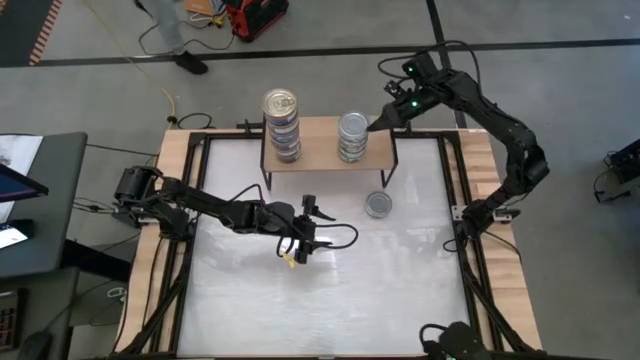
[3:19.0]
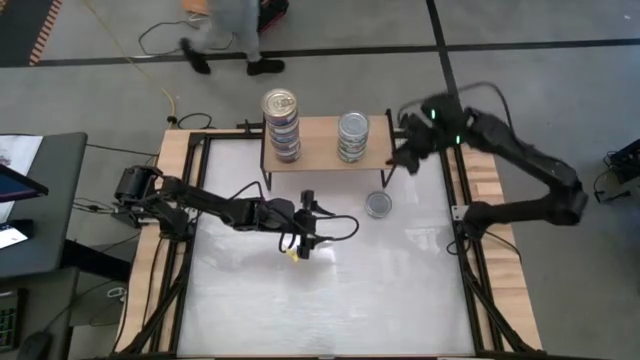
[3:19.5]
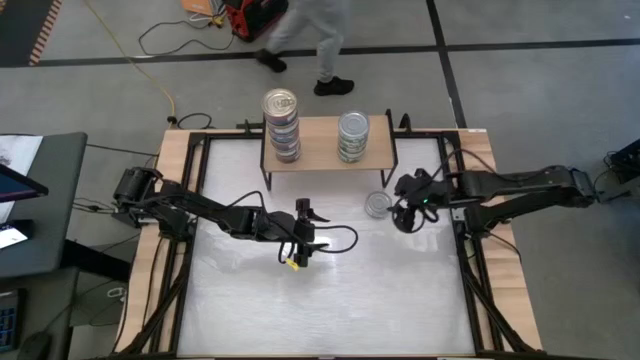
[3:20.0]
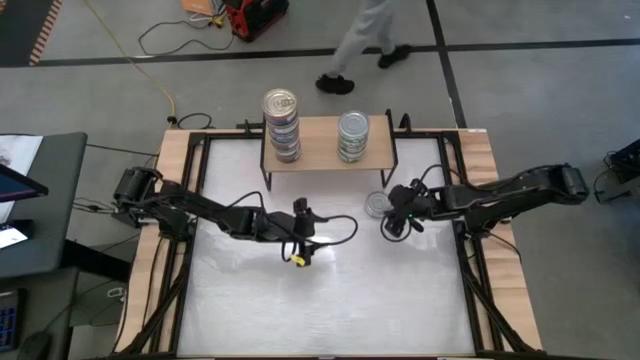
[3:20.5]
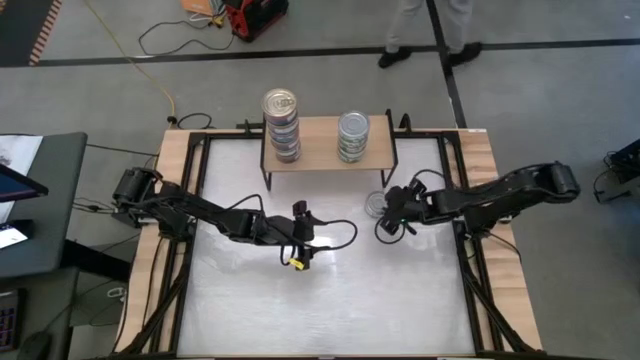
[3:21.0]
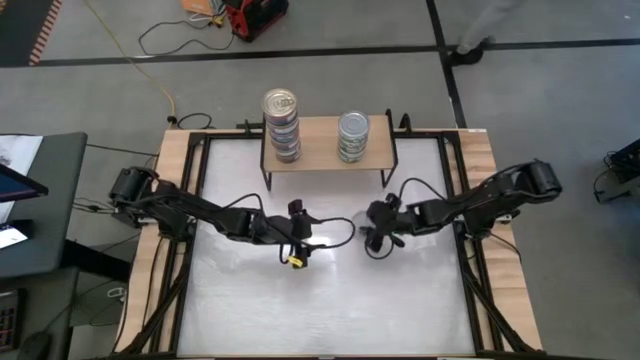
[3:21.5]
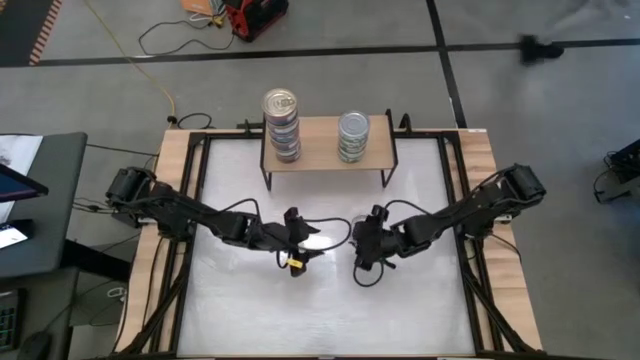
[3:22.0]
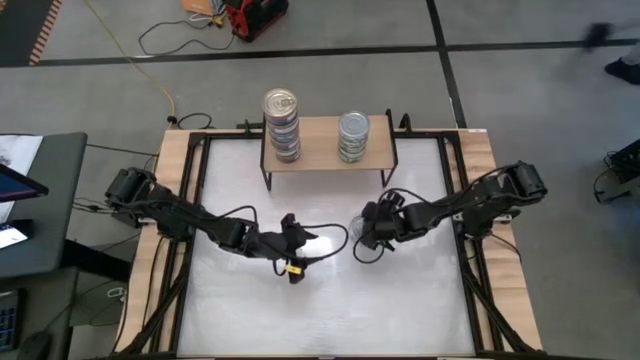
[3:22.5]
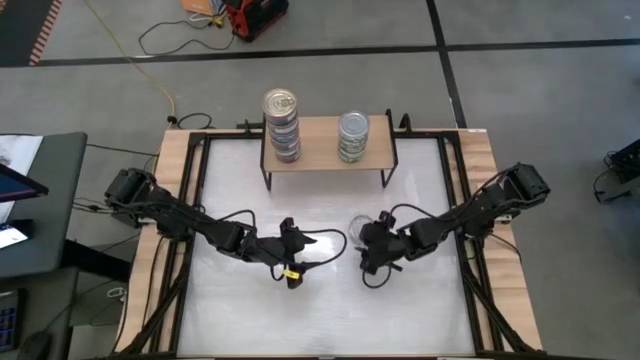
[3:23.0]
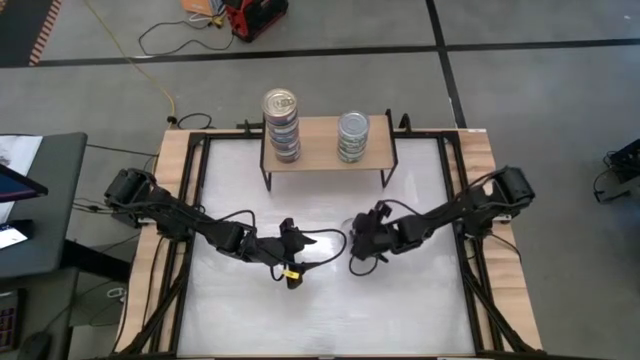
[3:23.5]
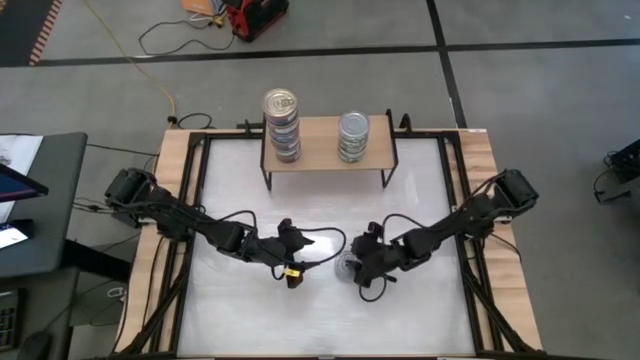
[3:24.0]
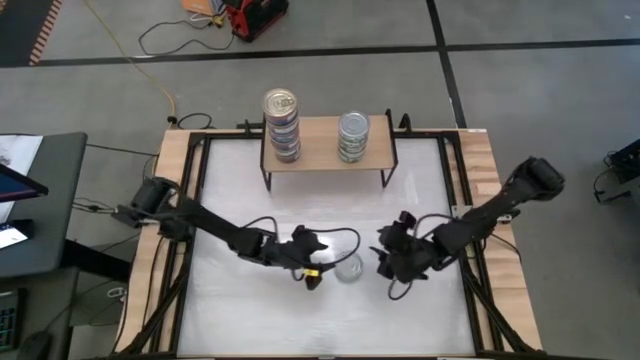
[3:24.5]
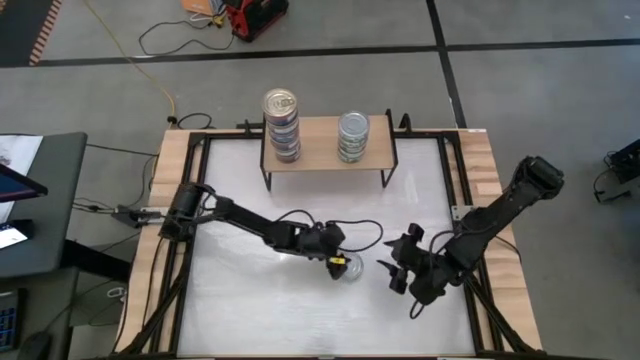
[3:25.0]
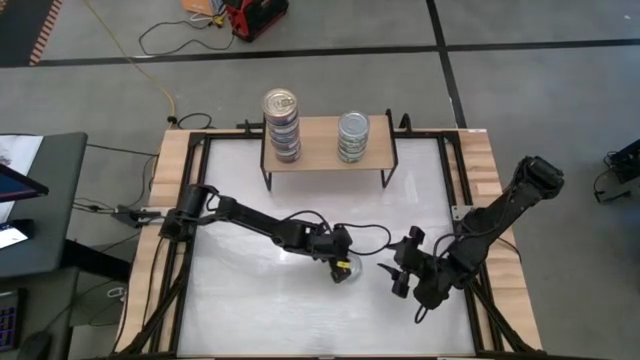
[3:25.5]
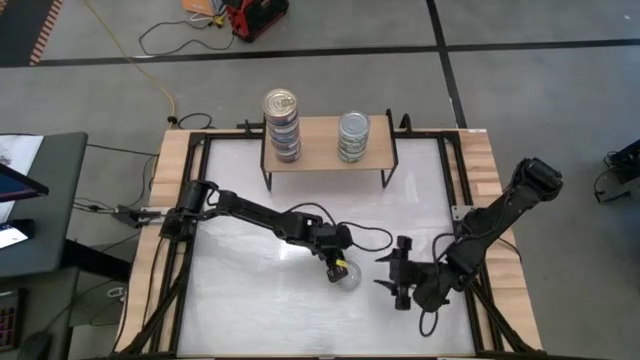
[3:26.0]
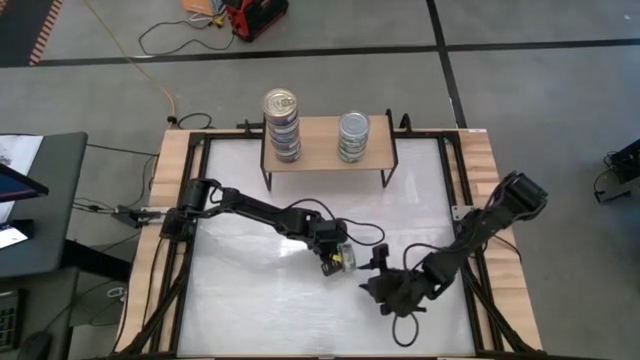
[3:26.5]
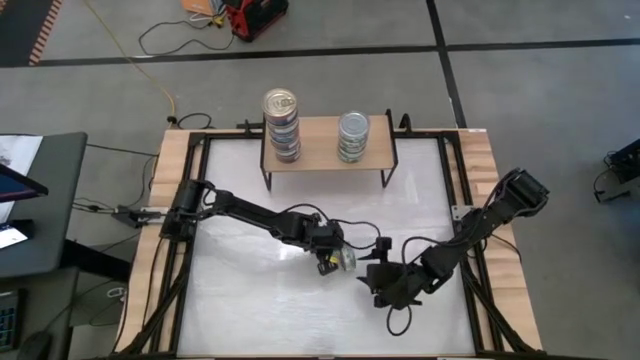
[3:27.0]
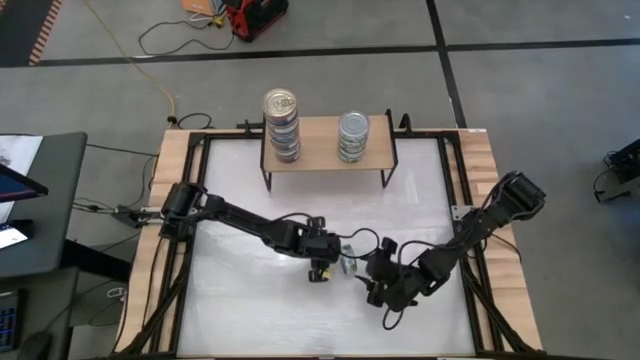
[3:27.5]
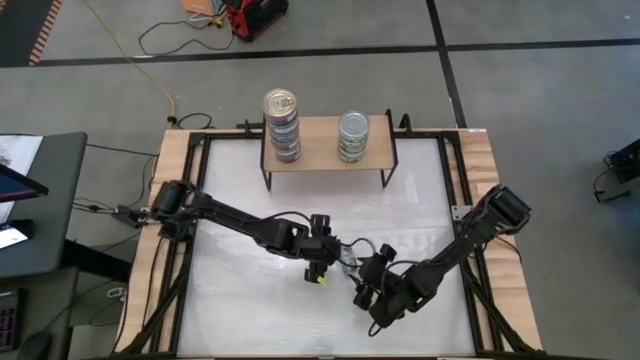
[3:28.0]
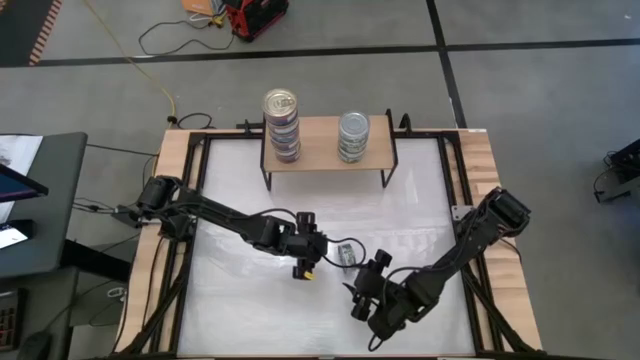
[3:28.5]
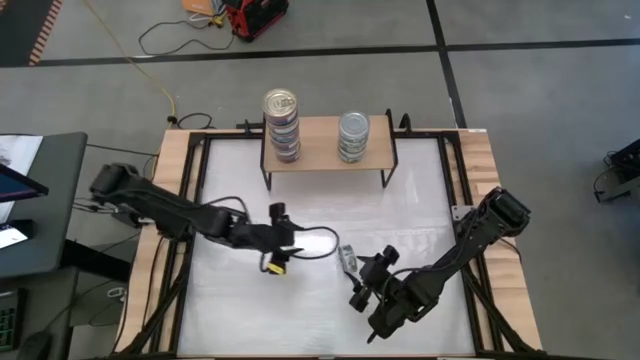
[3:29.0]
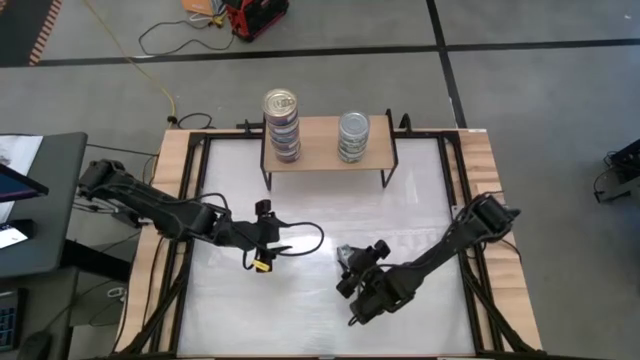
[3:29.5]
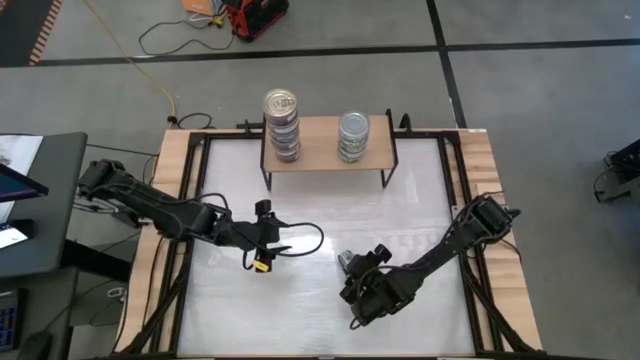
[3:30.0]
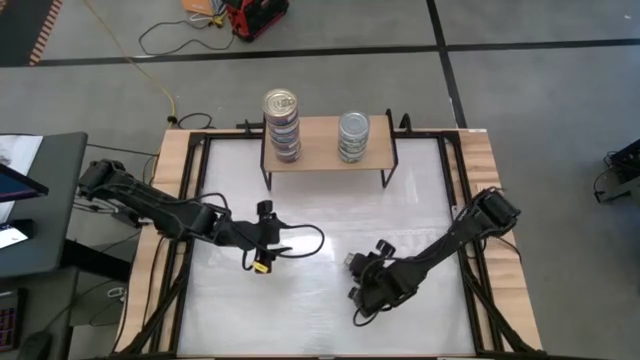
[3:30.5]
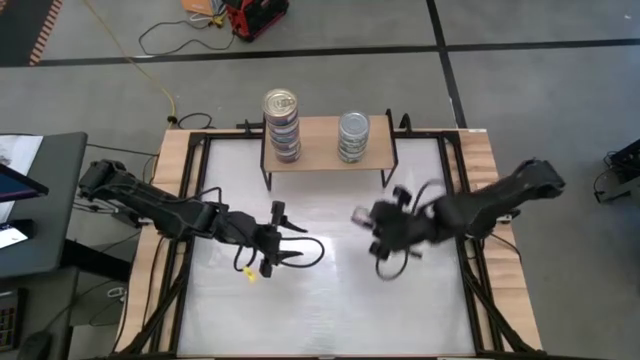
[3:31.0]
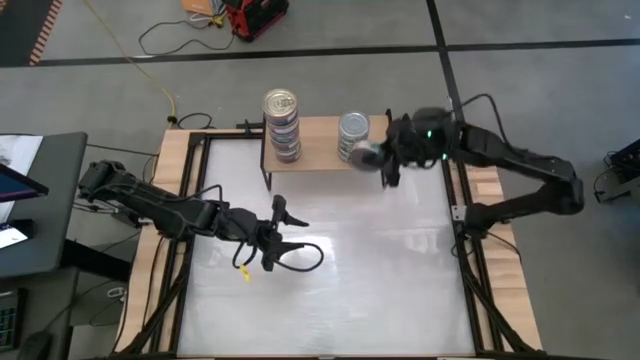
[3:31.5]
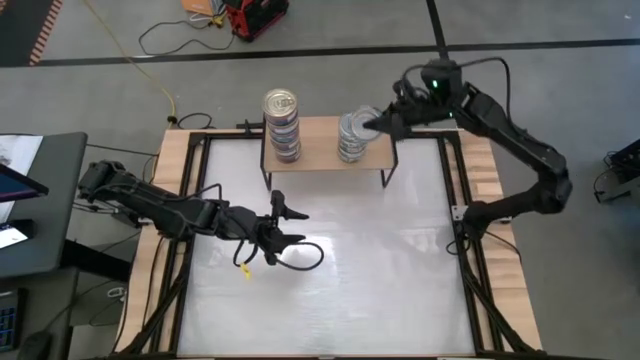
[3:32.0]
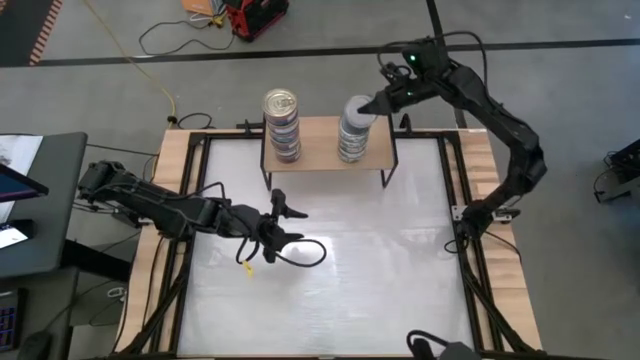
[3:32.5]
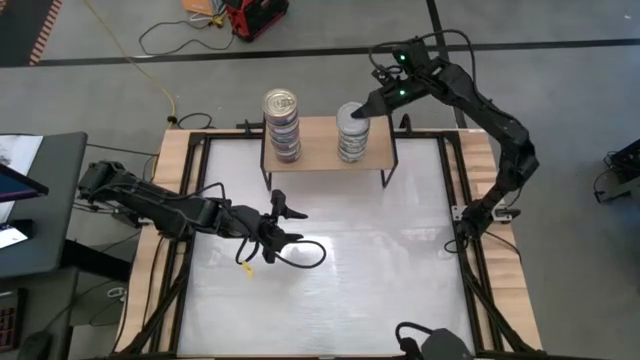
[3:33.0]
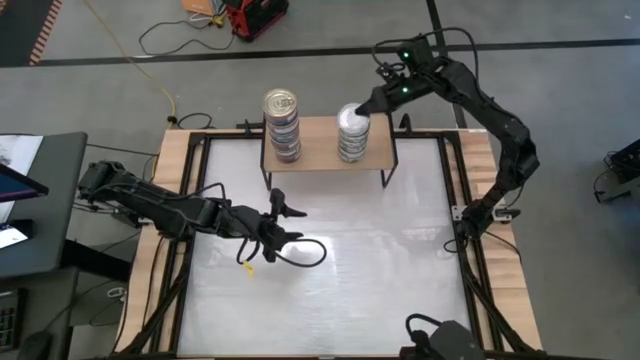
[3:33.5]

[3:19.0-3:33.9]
Task: Stack canned seafood by type on shelf
Stack the green tuna can on top of the green tuna can

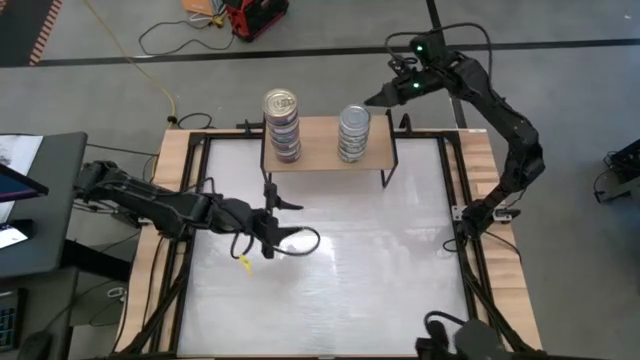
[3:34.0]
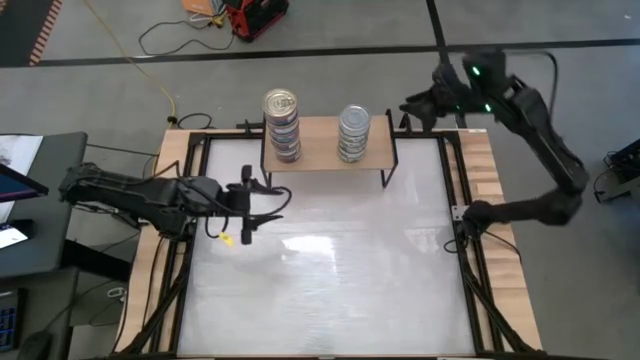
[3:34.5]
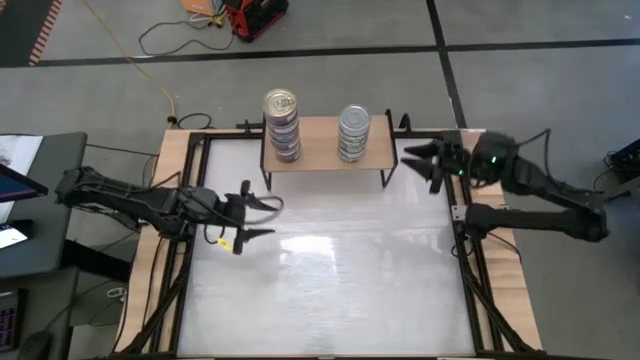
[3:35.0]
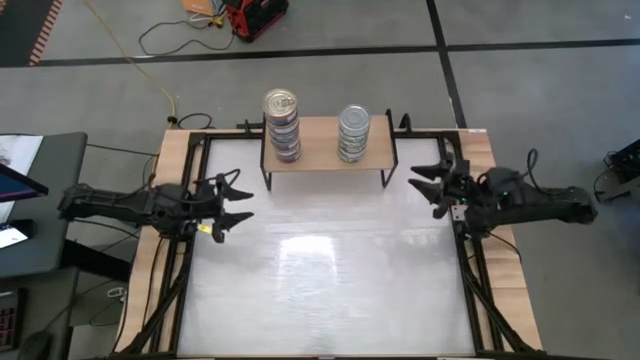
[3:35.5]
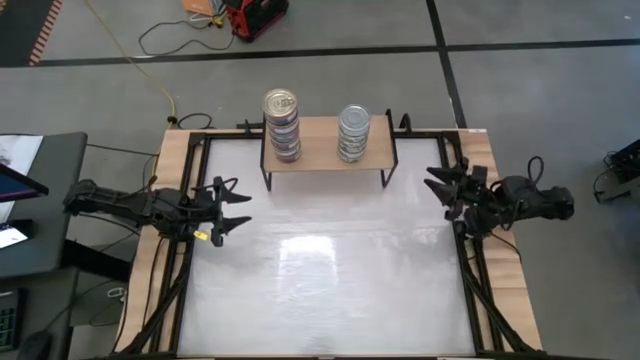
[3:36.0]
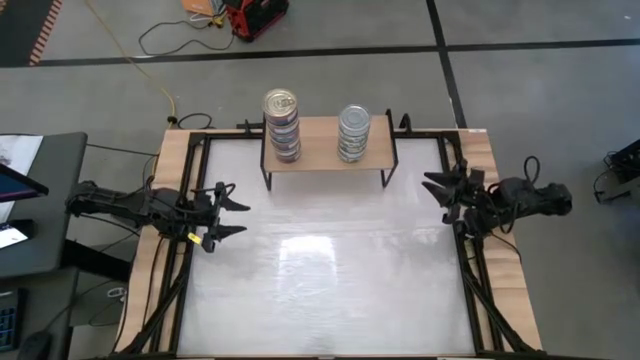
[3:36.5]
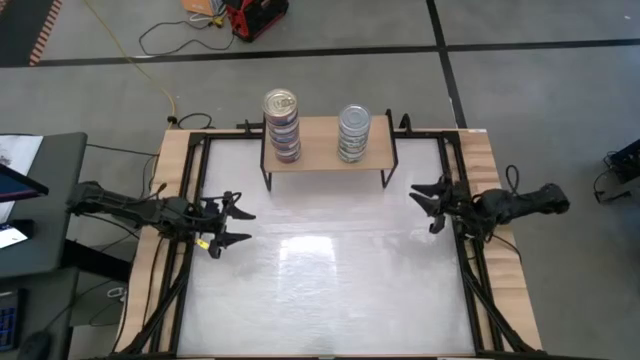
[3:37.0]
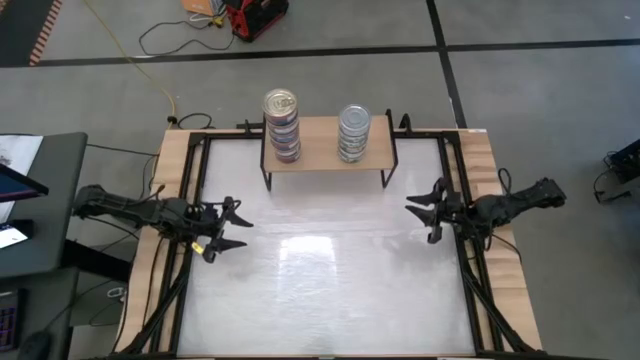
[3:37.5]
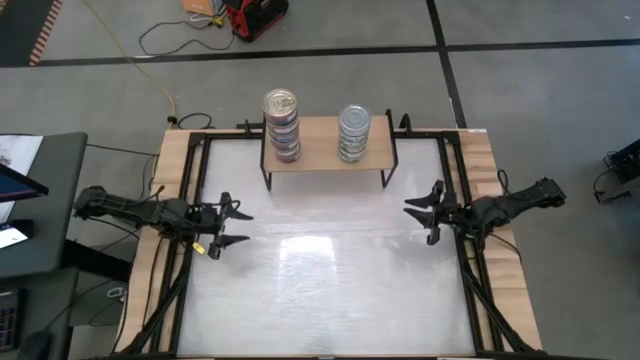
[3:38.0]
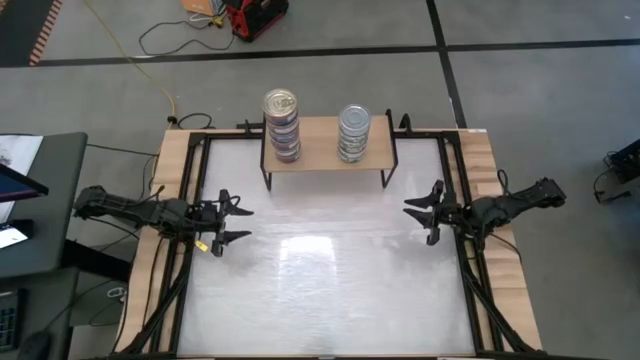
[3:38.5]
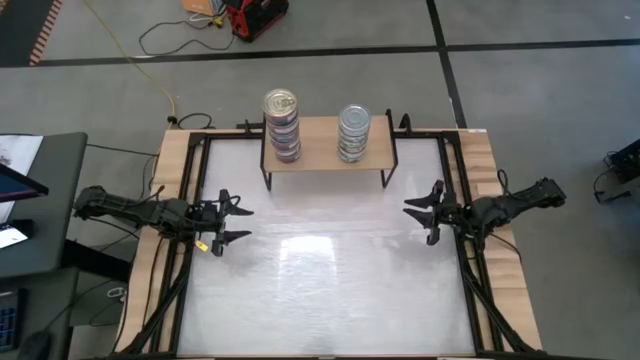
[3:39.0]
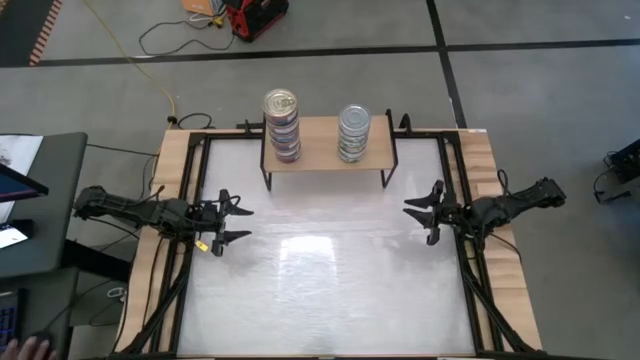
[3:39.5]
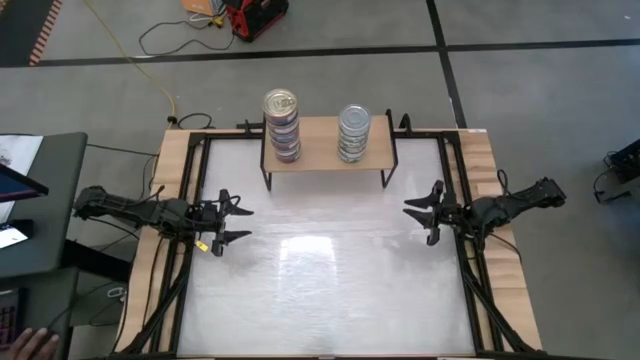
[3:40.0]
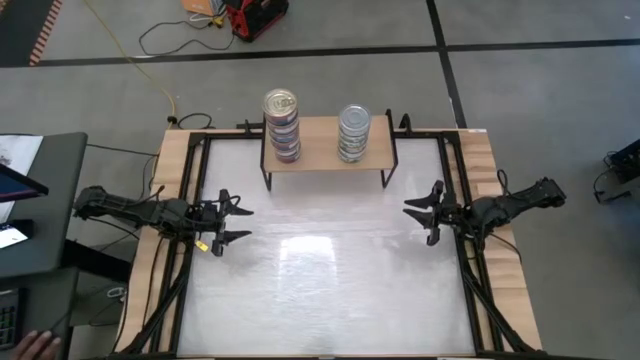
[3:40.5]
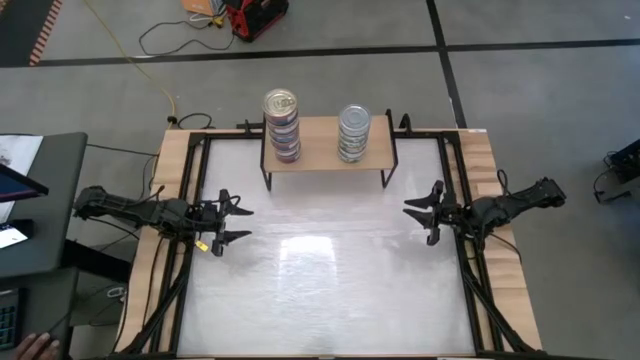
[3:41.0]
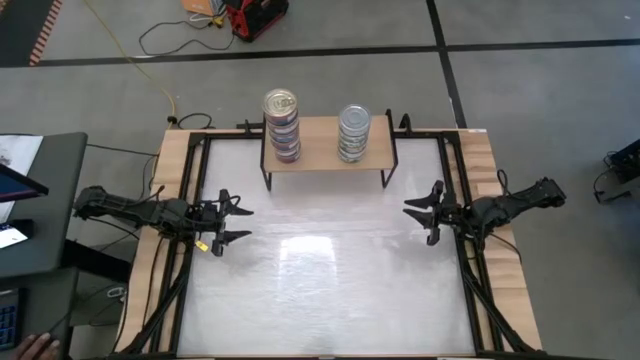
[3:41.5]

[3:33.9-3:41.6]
Return to Home Position
